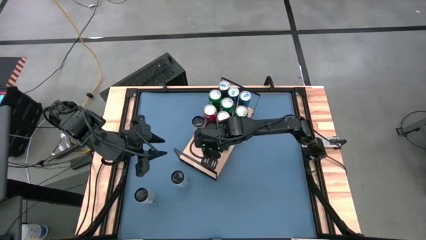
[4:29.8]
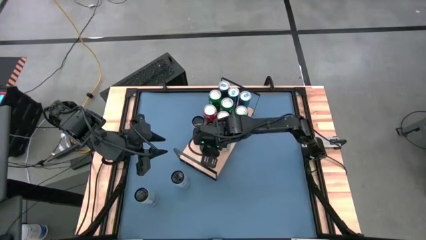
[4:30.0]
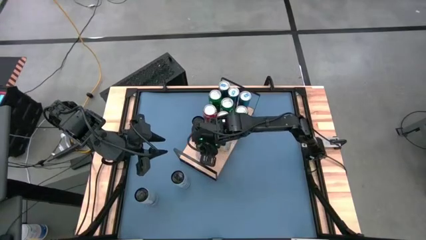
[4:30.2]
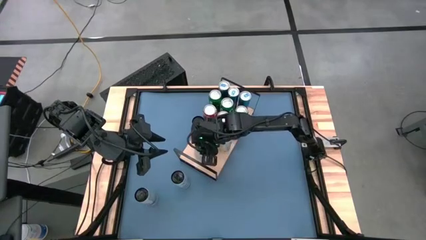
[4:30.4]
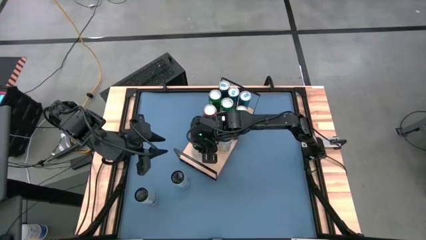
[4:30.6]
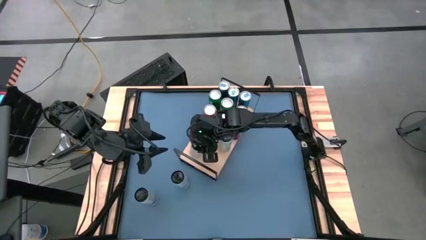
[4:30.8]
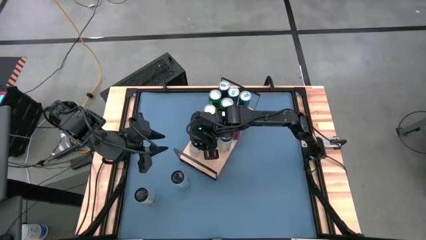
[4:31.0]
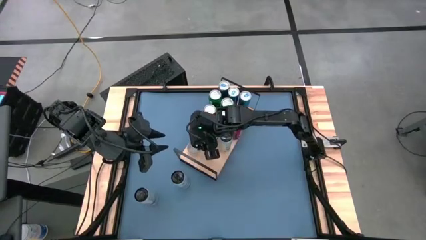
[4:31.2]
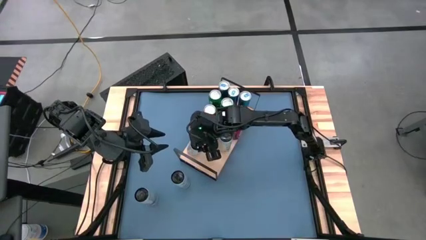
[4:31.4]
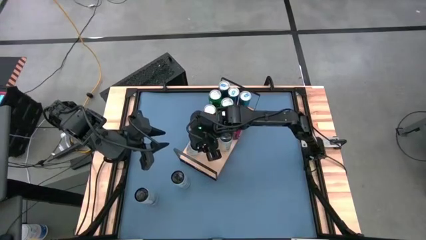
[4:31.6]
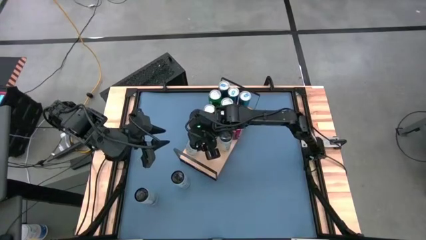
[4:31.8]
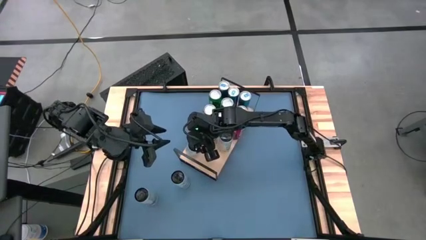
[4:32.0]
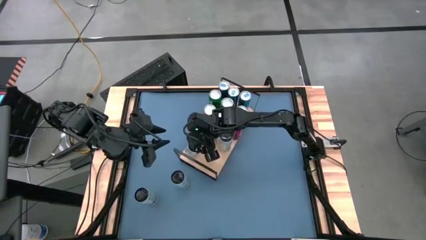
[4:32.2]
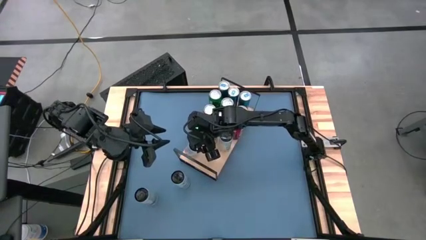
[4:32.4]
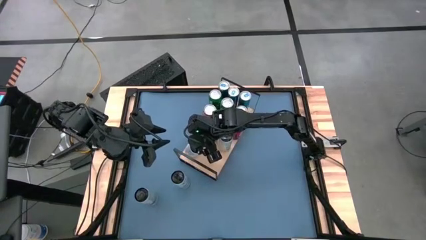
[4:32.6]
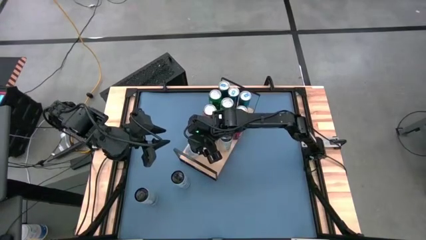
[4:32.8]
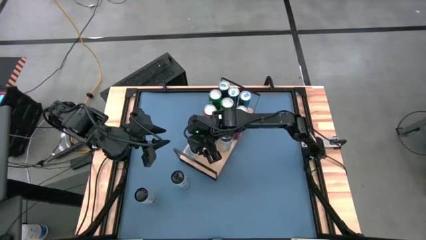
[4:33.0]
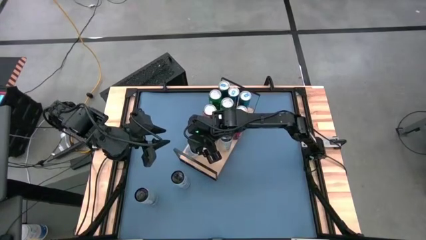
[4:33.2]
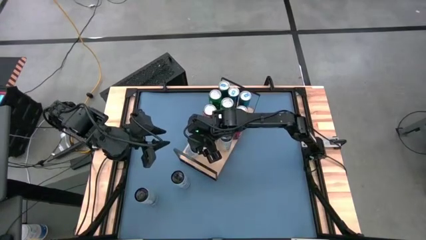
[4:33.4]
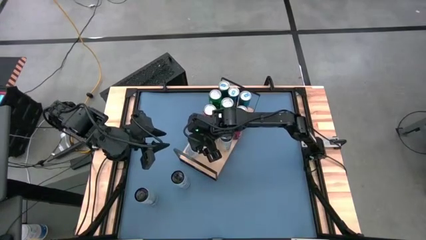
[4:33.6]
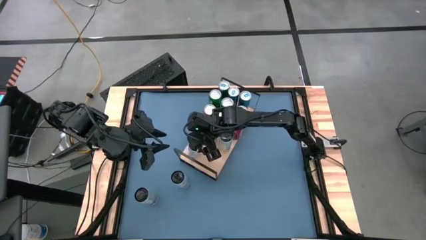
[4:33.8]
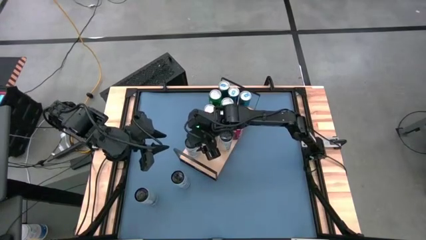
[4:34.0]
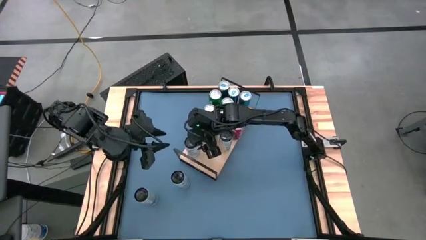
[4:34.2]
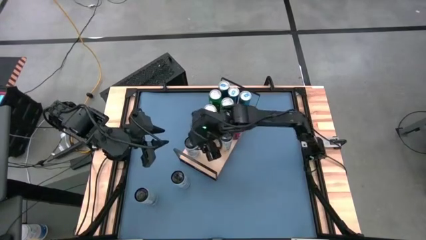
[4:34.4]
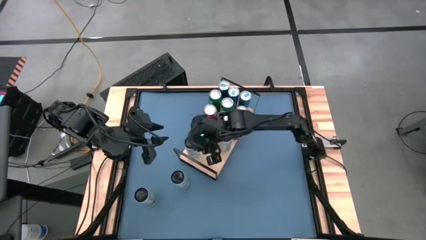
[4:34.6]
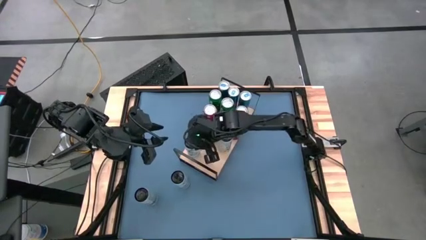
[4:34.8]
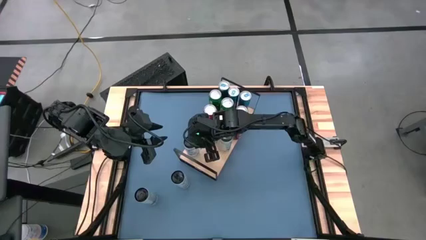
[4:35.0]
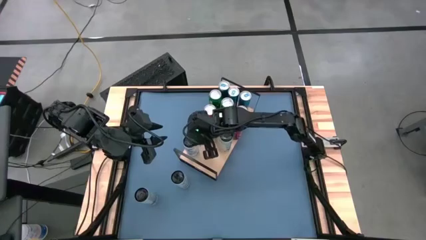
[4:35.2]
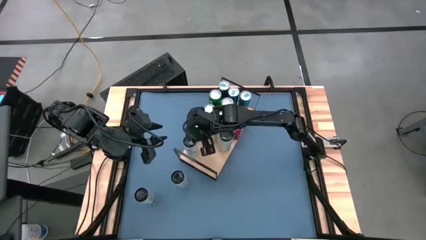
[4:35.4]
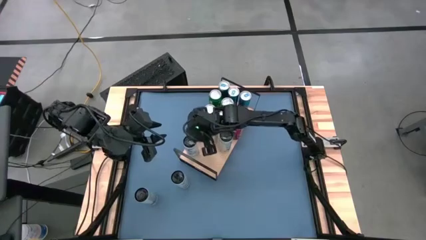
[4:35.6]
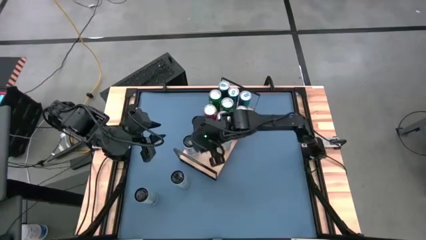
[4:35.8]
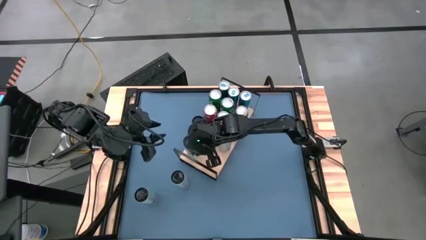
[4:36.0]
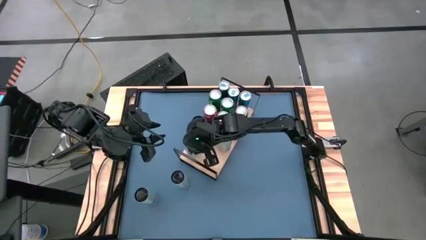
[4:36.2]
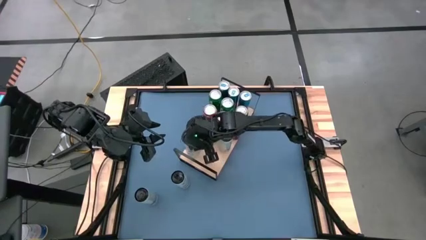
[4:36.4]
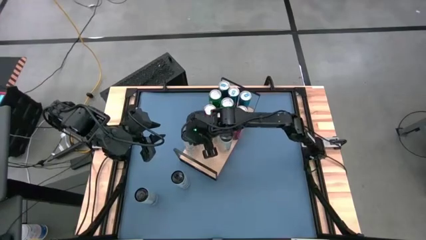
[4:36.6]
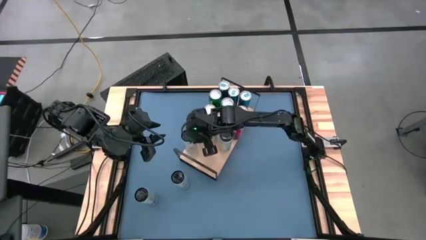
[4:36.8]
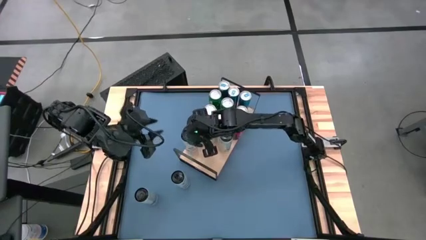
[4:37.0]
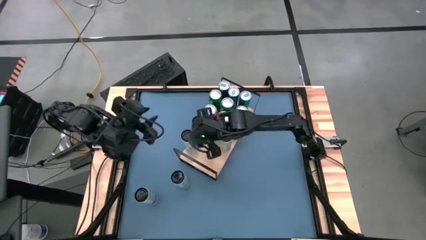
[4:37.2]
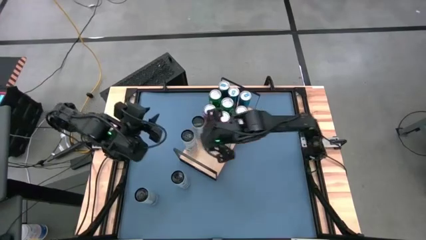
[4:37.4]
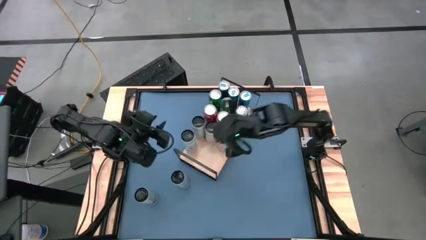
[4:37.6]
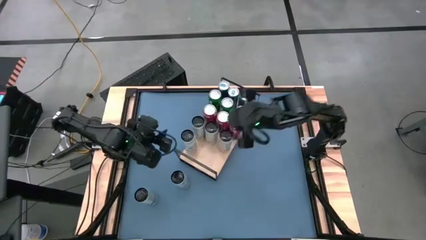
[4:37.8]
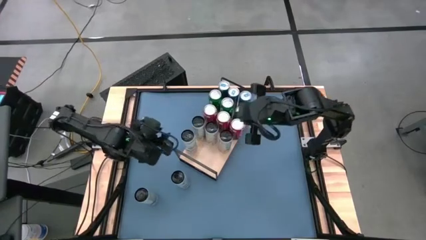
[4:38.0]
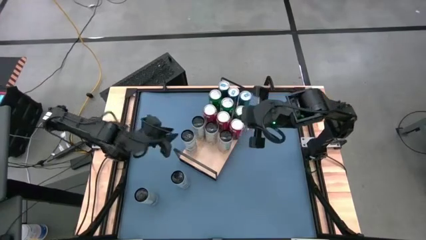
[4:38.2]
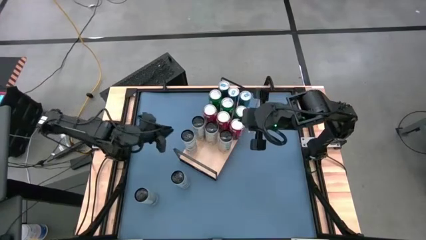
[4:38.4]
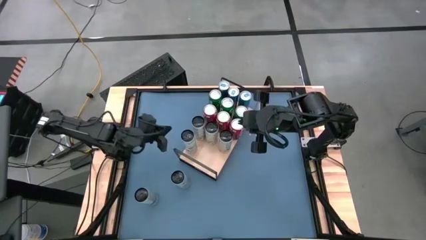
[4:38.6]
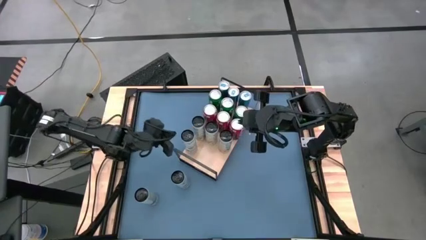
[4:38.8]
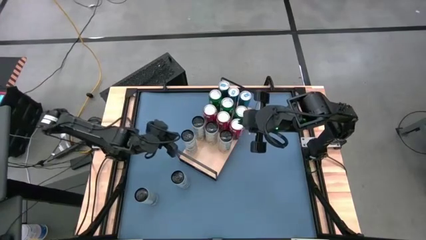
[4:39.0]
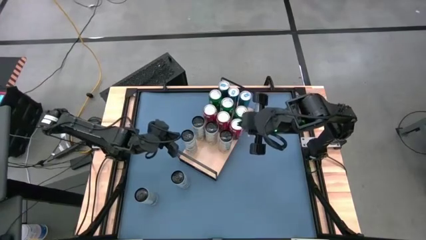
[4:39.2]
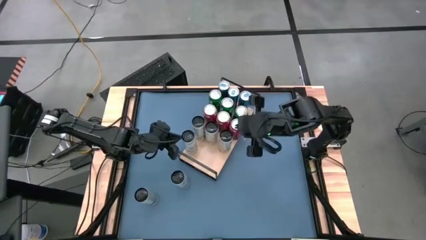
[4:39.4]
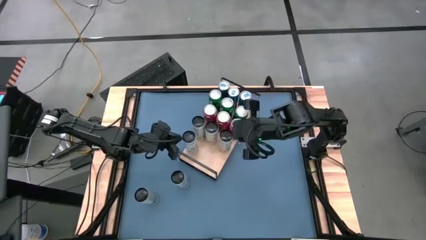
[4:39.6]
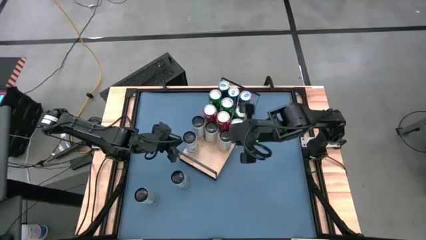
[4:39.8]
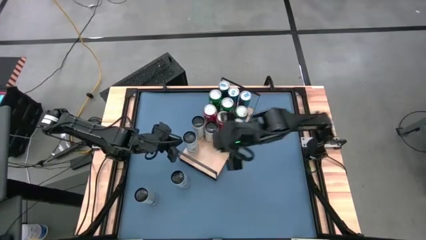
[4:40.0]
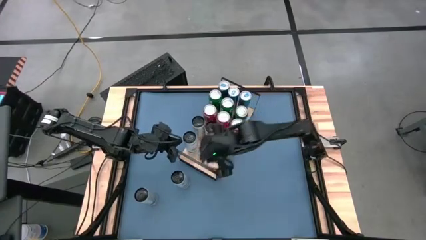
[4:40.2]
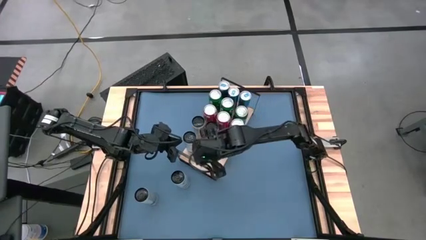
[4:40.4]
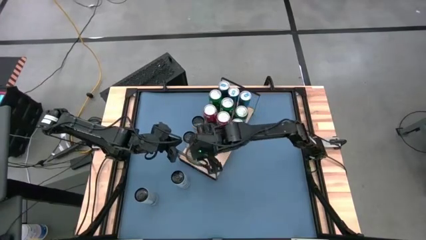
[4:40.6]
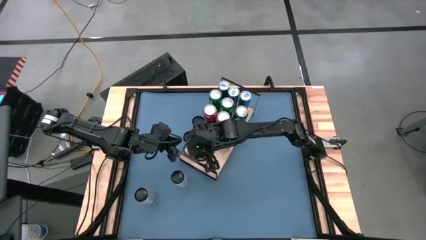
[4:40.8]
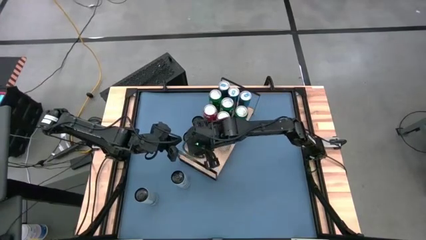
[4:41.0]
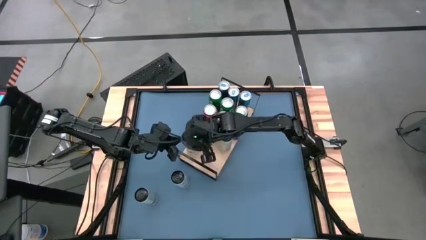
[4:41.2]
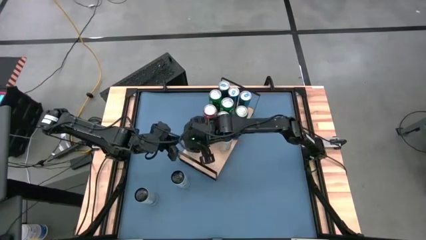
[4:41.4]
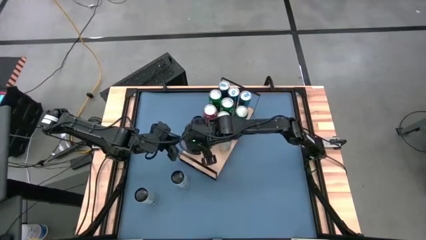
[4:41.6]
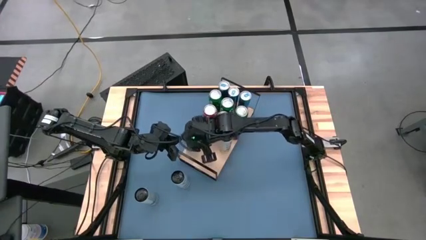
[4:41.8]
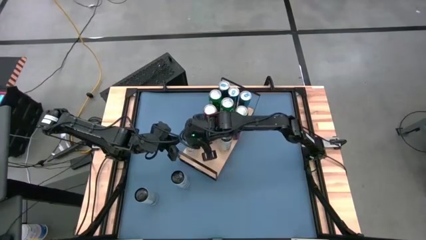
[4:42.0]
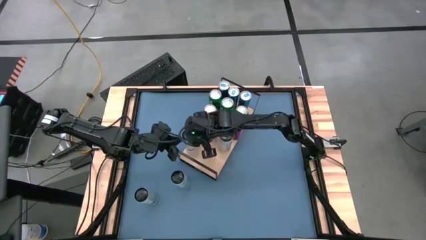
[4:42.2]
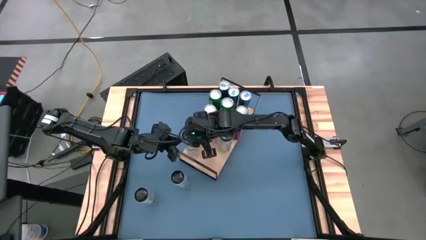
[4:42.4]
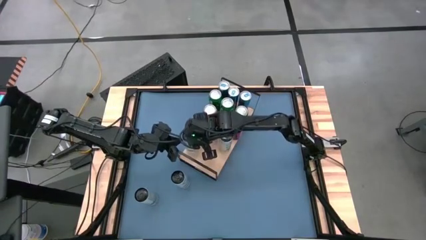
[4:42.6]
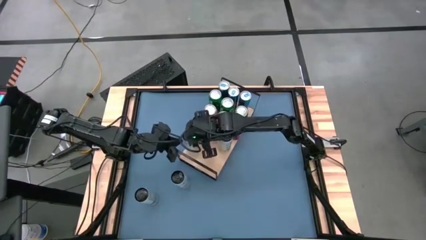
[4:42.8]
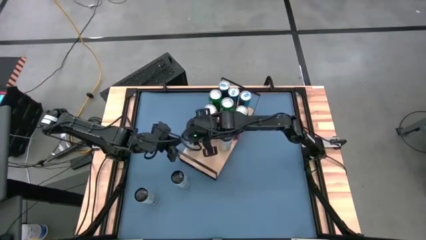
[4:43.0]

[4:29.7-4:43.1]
Task: Place canned beverage on shelf
Put the right white blue soda can on the shelf
